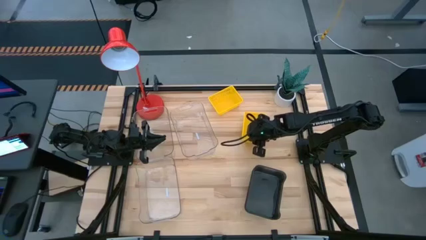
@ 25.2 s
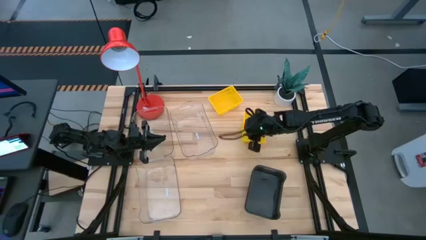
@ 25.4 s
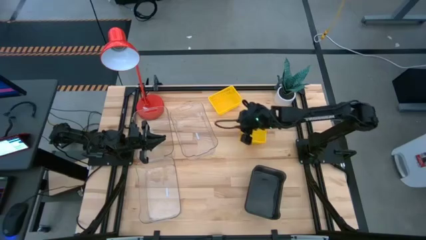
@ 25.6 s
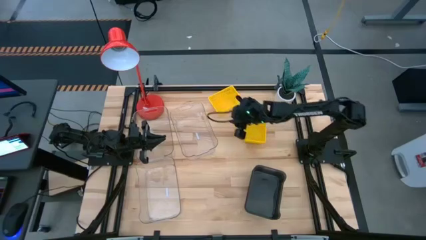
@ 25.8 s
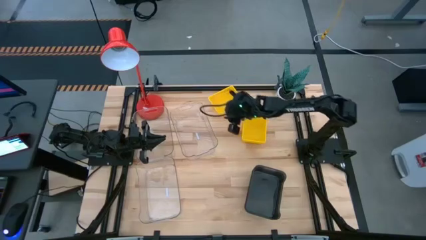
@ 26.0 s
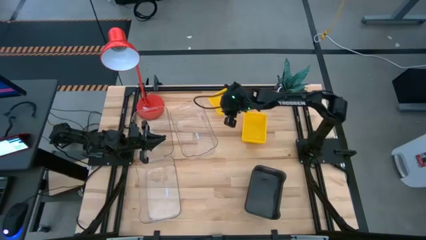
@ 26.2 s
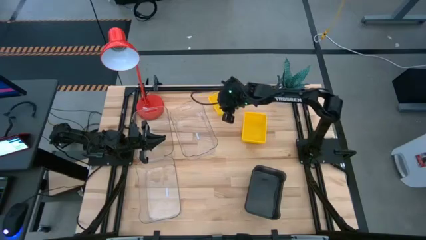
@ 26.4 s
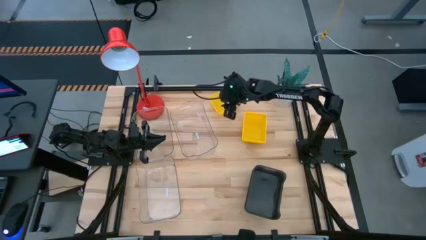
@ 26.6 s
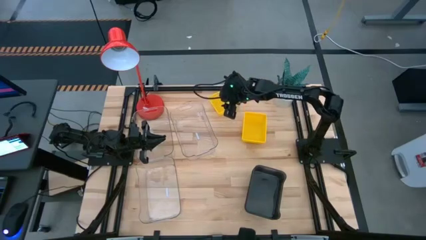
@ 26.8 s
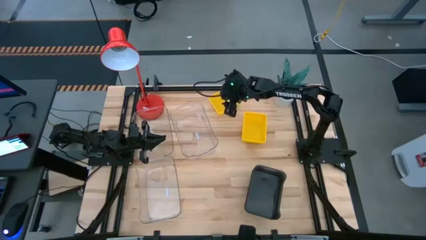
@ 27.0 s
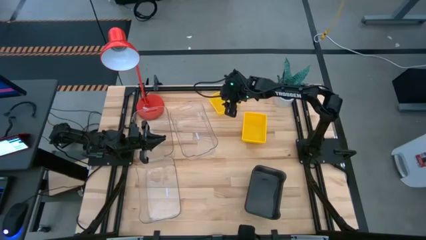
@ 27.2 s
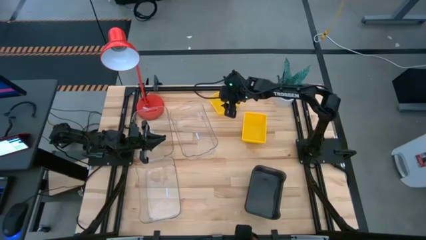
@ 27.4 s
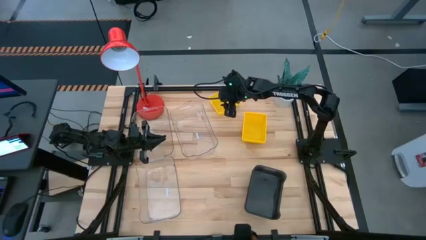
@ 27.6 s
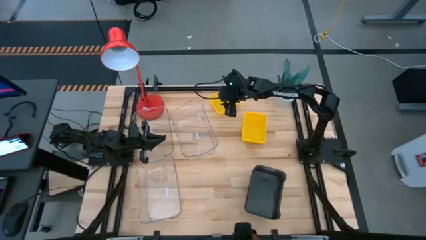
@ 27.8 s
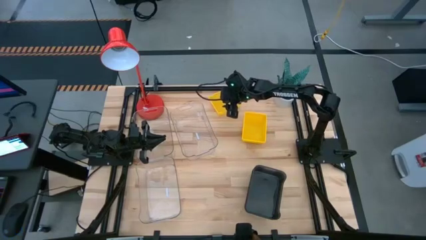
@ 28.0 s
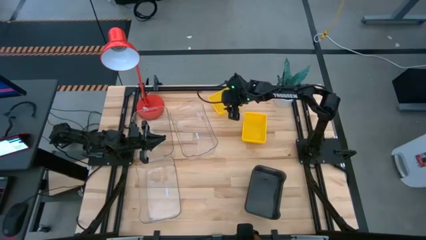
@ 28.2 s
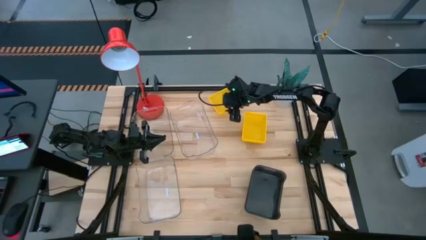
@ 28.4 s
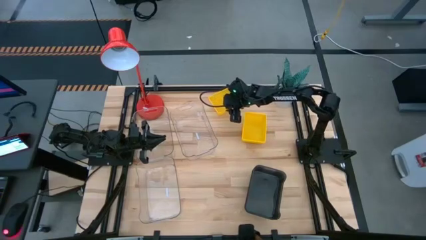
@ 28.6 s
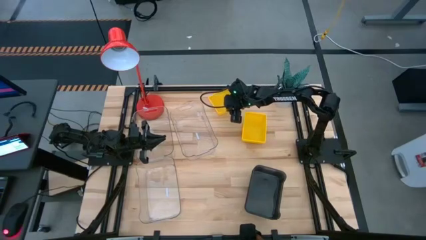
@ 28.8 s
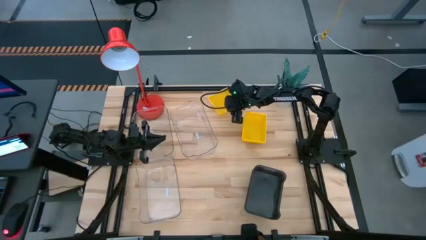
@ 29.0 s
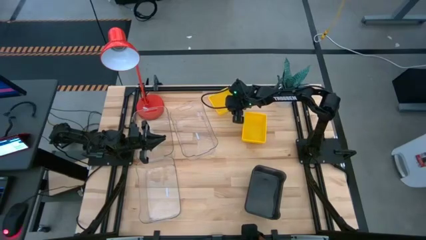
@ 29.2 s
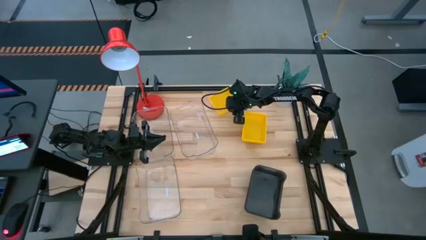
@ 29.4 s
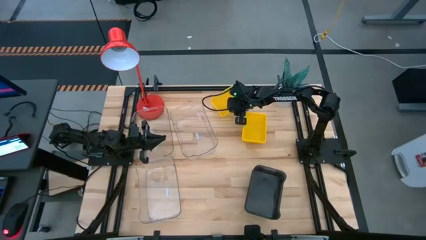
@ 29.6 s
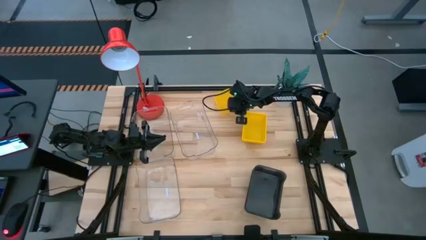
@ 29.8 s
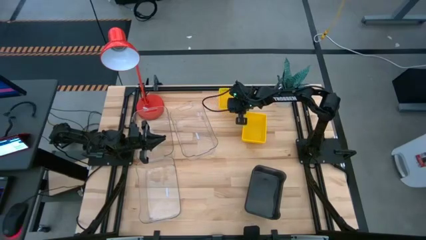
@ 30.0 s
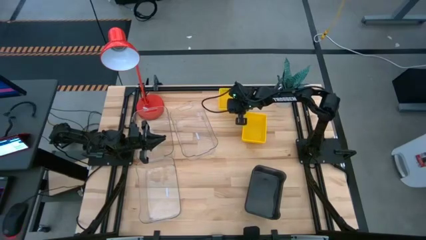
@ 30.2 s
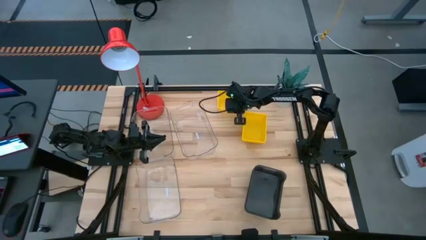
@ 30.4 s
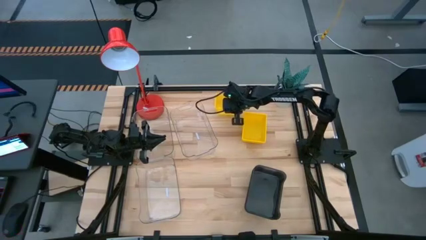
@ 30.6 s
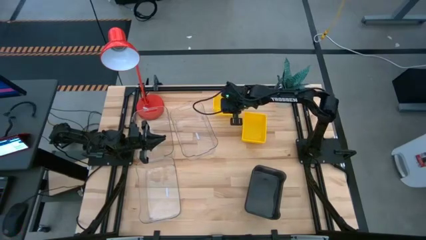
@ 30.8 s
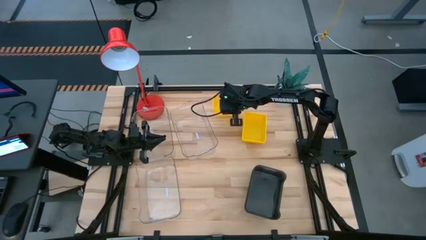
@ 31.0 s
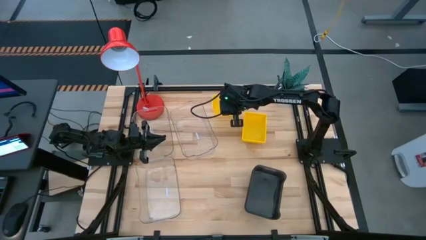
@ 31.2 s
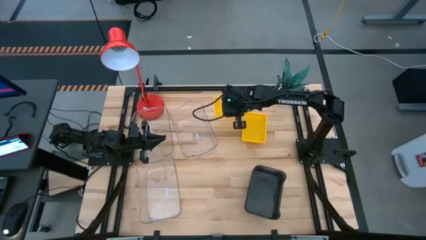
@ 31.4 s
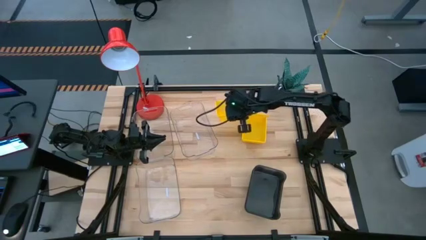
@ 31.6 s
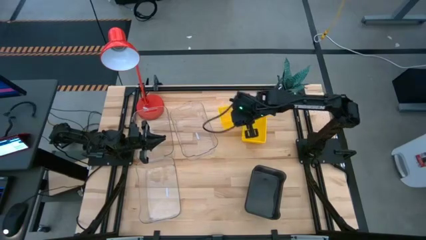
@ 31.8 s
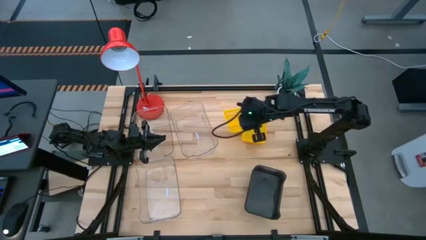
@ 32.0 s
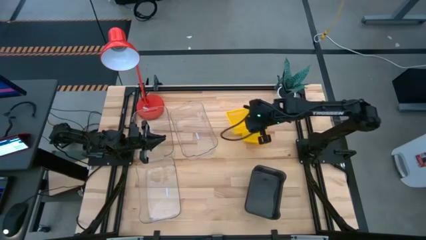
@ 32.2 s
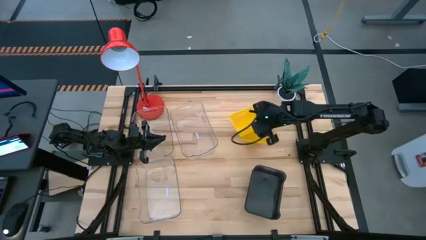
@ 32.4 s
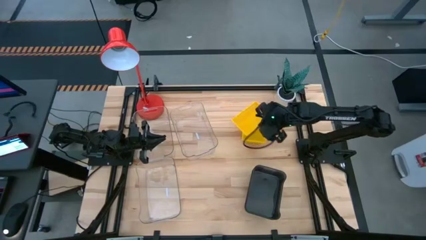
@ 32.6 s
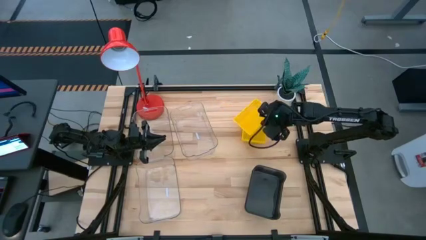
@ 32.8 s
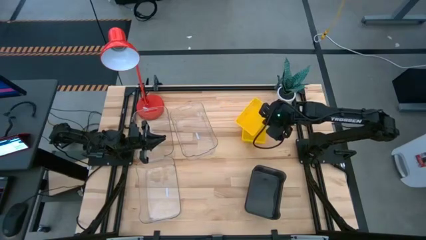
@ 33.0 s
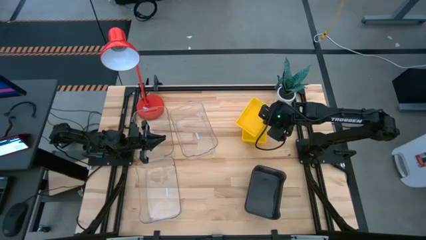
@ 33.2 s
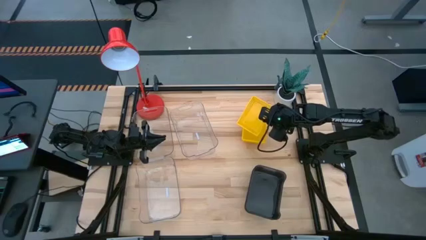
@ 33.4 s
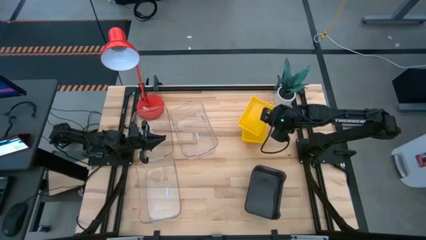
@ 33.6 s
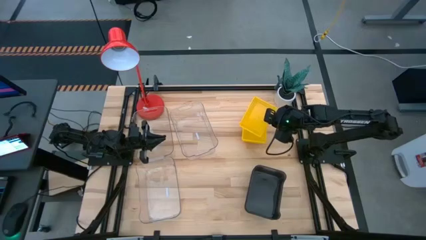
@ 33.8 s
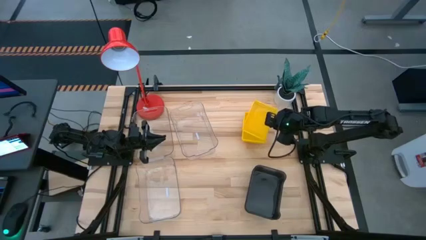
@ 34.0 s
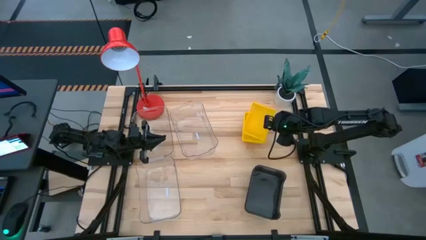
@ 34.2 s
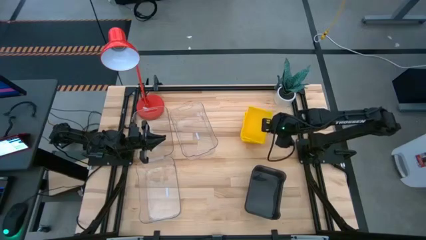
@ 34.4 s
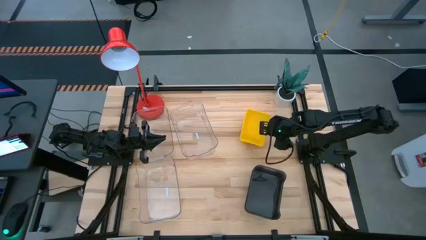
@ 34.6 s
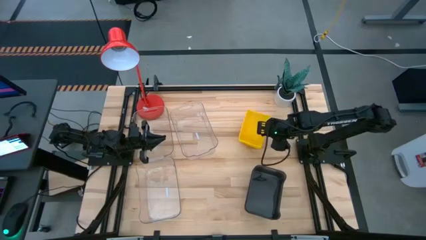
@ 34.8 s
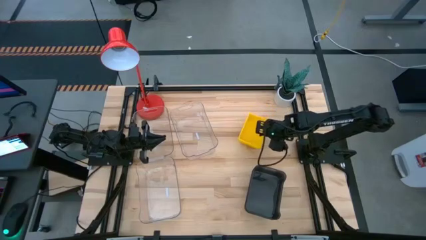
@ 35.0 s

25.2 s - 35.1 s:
Stack the top yellow bin on the yellow bin

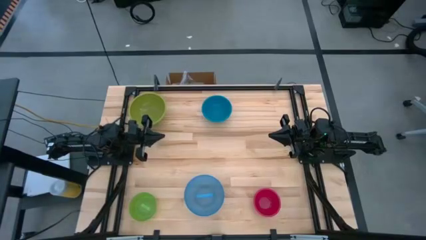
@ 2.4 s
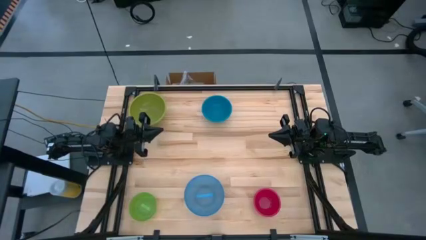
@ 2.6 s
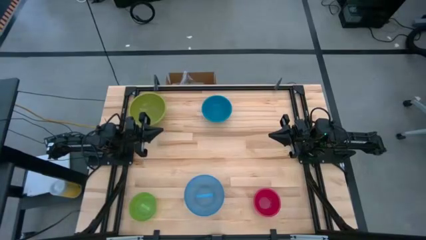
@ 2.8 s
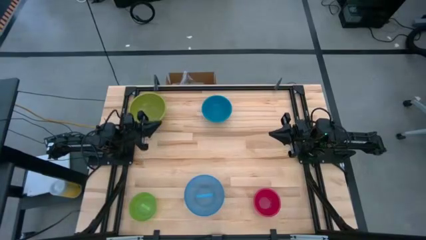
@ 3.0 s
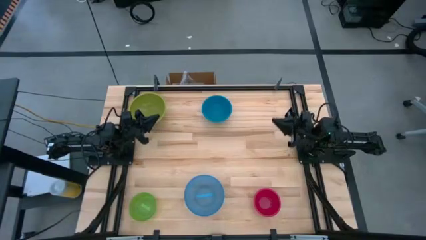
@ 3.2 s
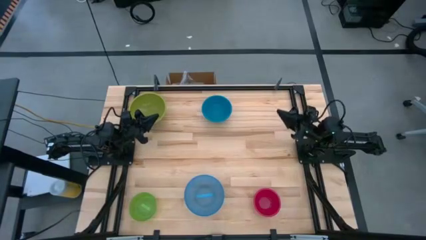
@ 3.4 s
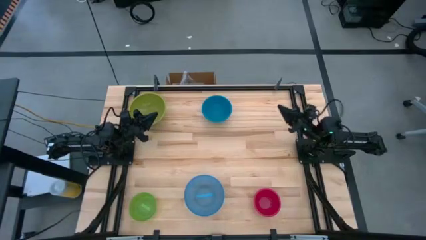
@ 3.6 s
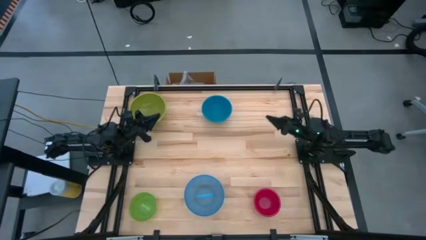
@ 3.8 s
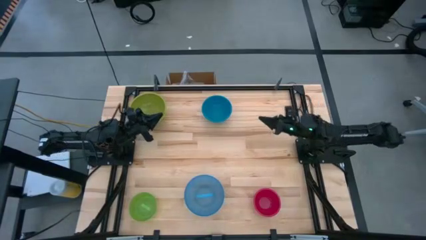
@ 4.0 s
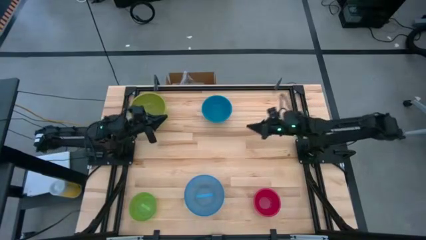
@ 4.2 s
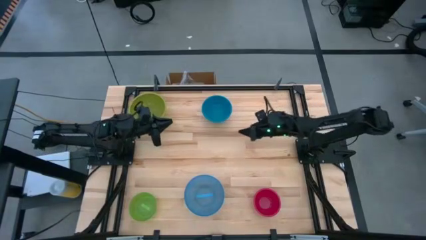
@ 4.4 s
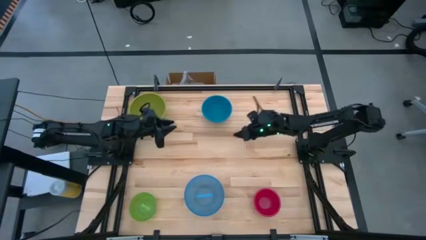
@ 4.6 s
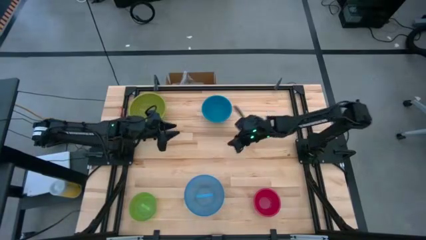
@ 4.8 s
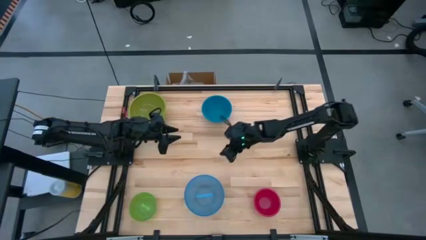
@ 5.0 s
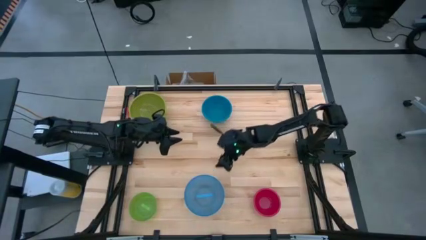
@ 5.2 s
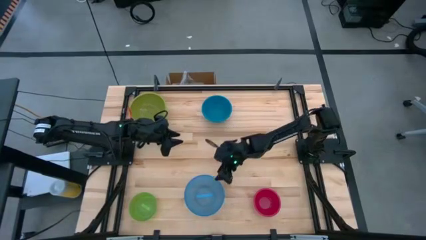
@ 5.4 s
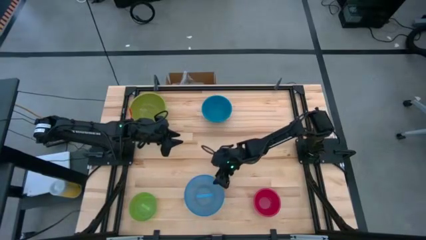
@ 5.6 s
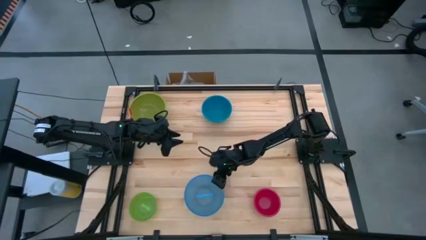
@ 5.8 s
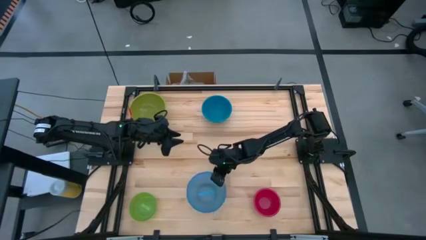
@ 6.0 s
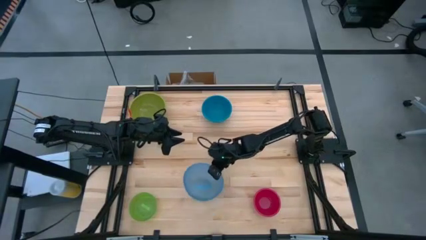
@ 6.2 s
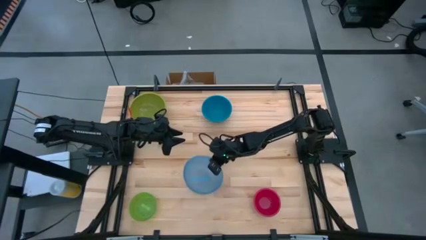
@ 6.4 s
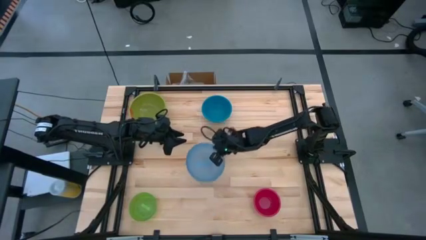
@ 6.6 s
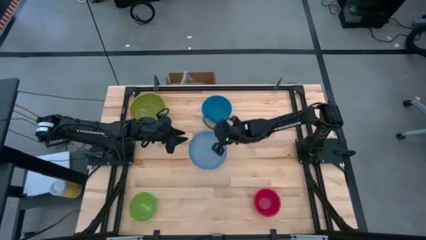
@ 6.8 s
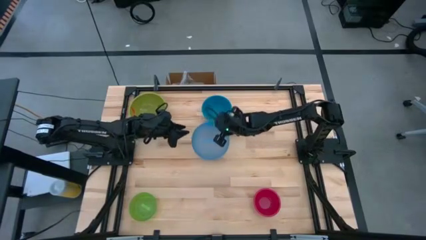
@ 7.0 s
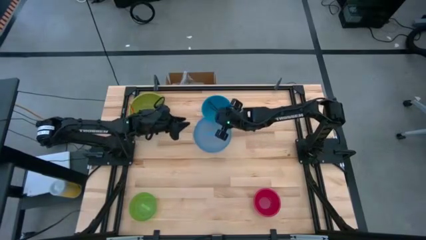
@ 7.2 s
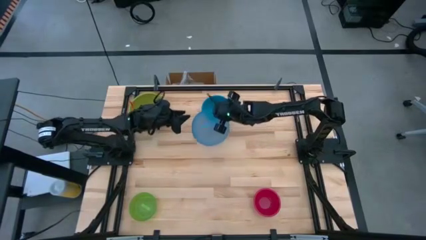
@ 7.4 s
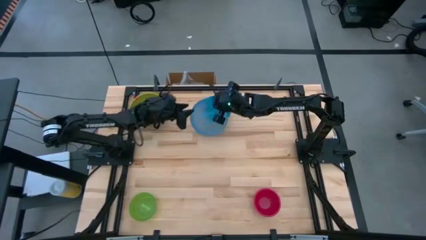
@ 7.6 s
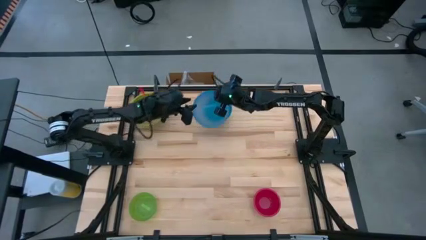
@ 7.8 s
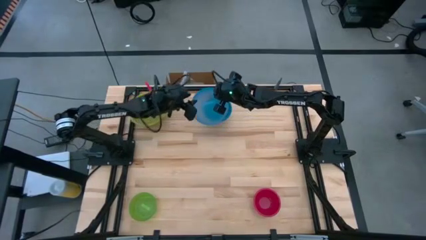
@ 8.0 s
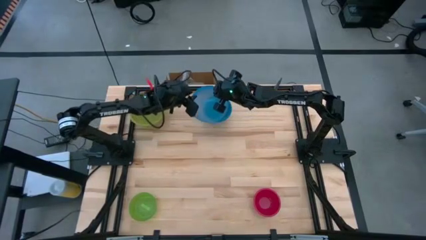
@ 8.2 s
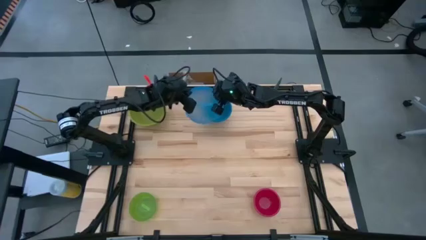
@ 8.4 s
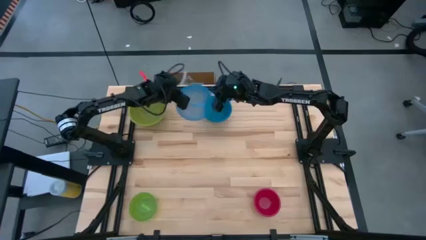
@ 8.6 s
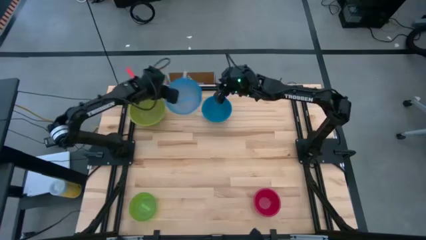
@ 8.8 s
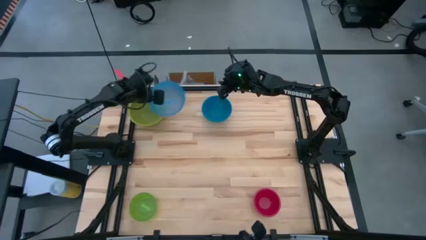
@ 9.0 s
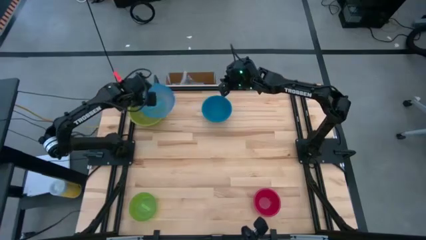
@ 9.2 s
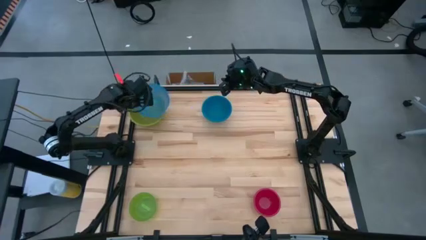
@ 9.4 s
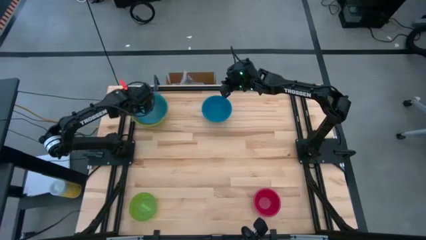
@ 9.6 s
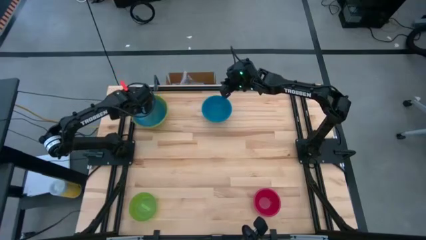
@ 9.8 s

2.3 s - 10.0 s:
Stack the light blue bowl on top of the light green bowl
